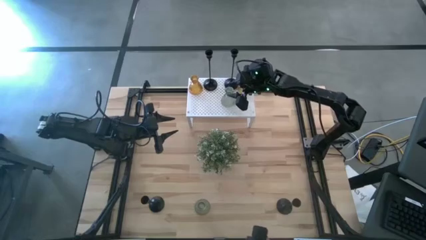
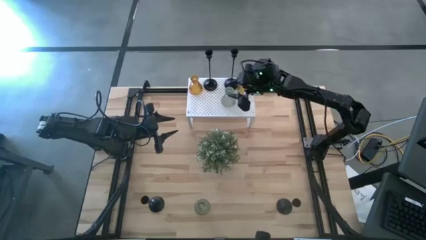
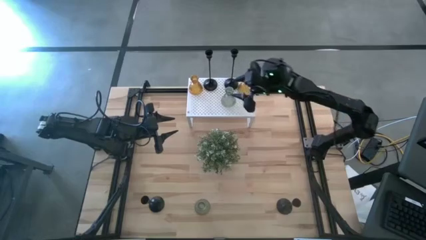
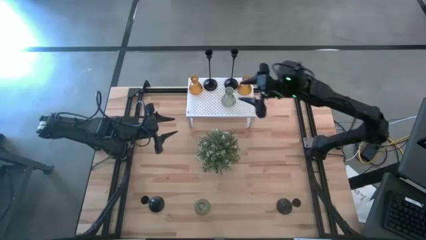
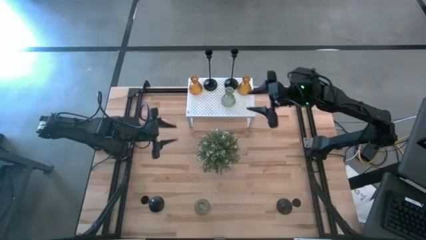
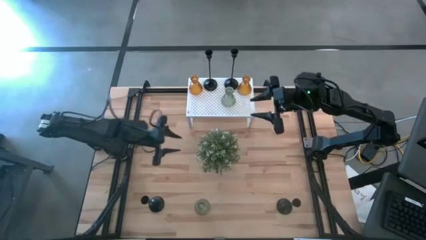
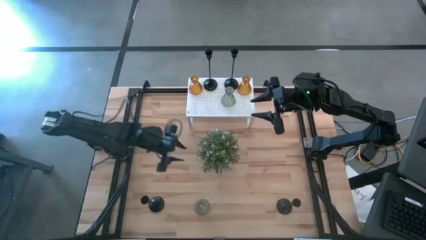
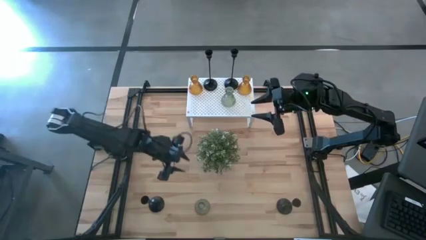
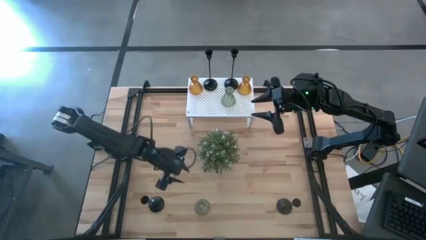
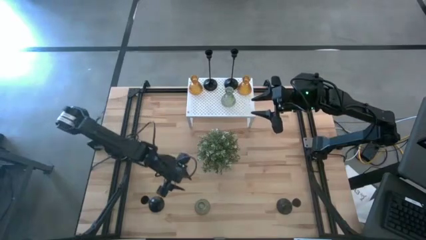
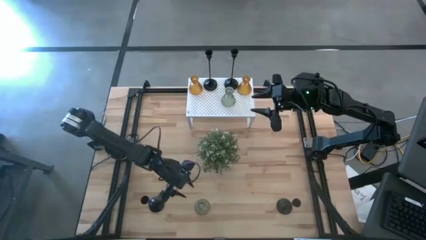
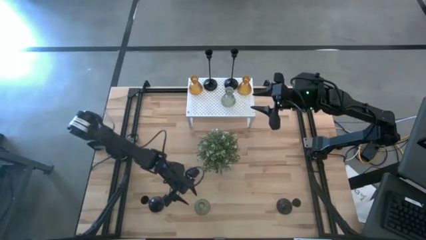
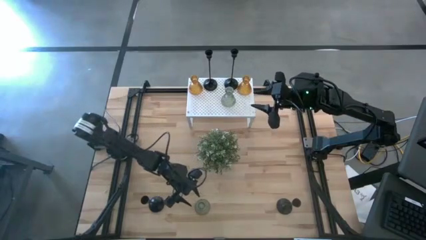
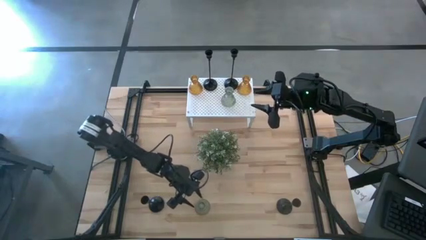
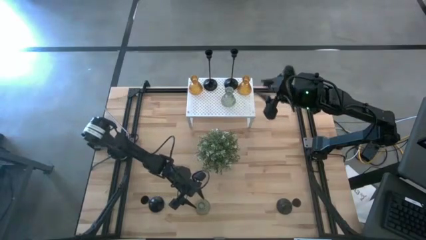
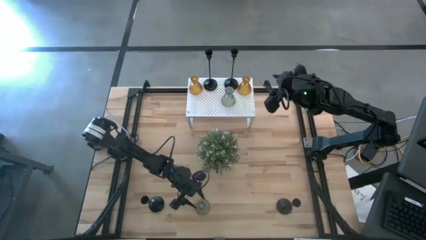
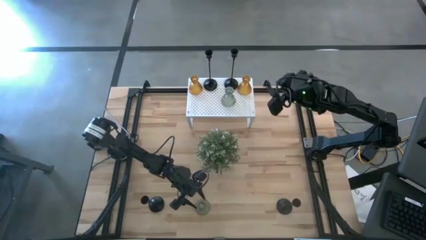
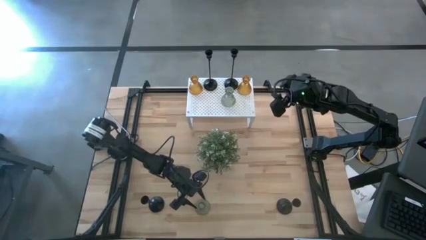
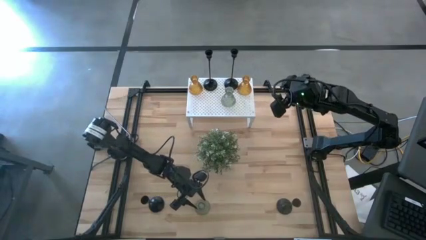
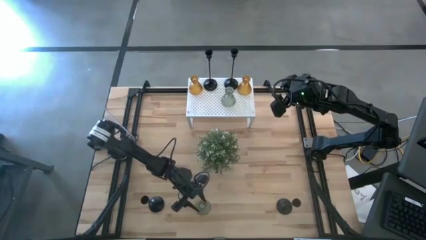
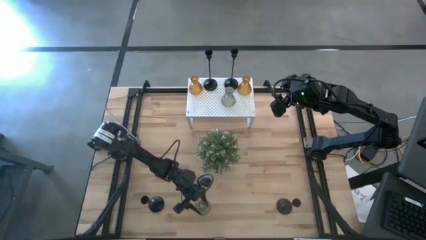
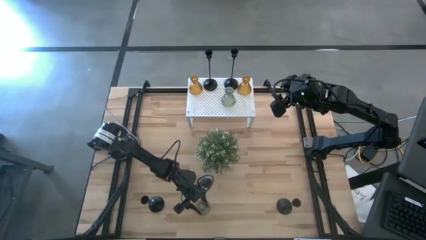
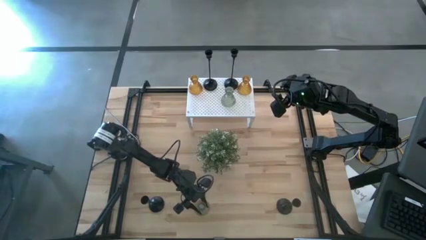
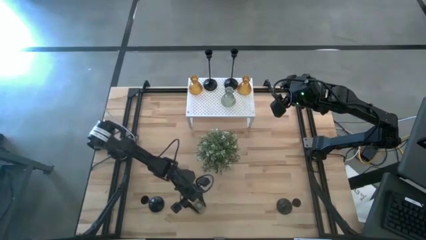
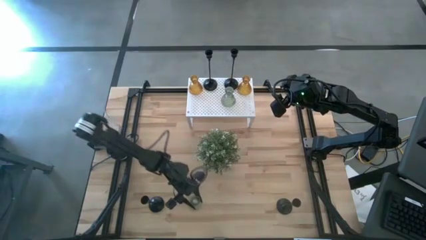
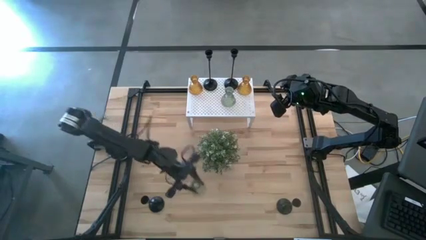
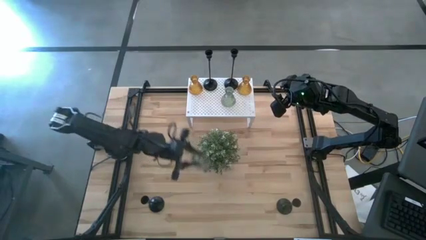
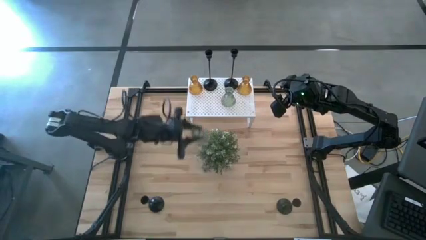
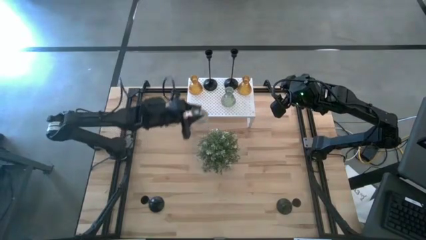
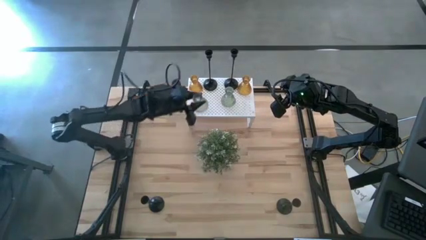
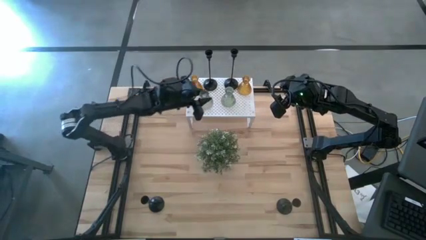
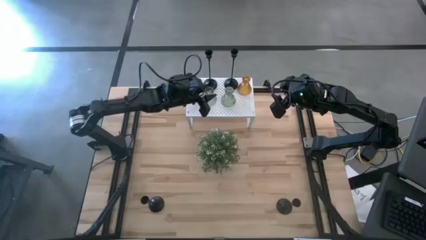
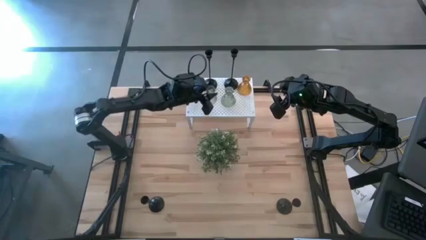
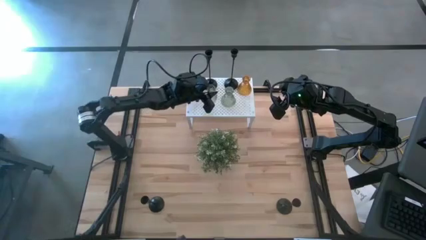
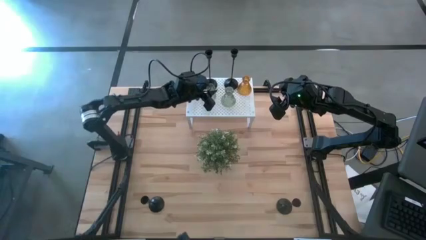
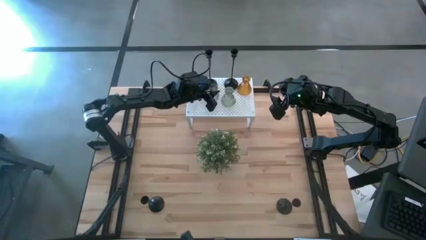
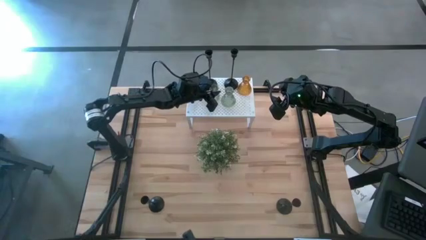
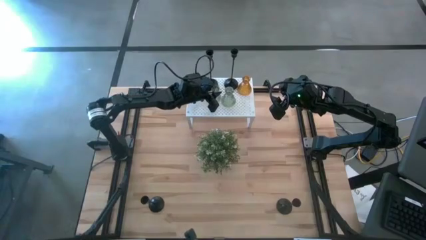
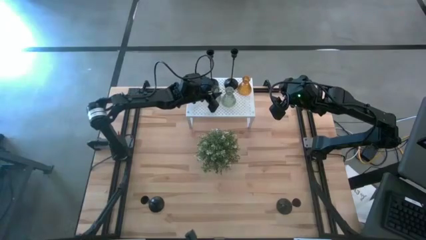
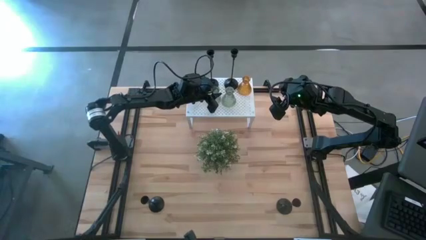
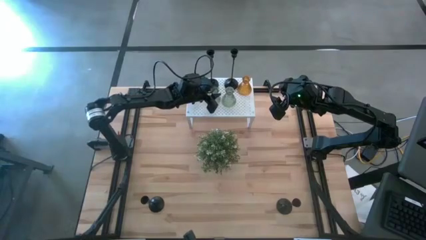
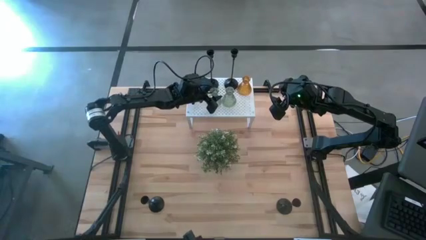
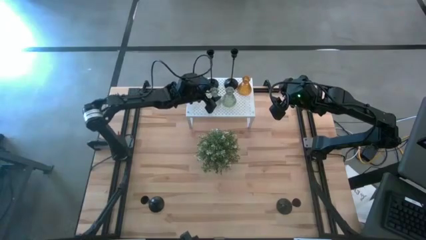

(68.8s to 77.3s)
Task: Pick & Place candle stick holders
Put the green glass candle holder on the shelf

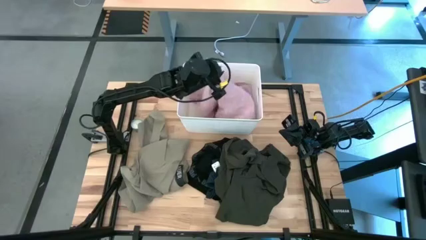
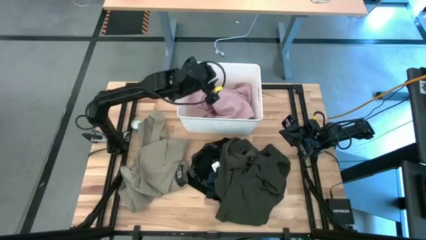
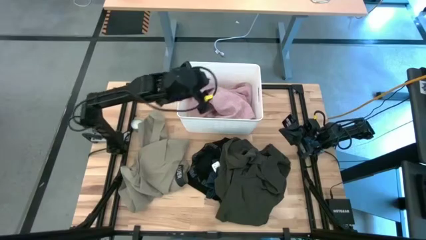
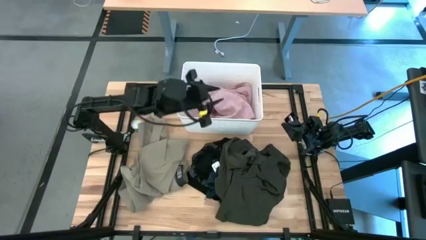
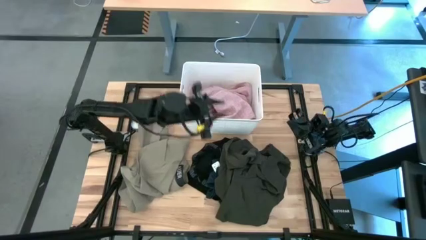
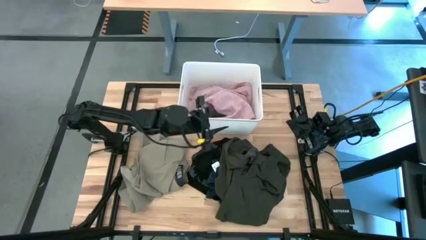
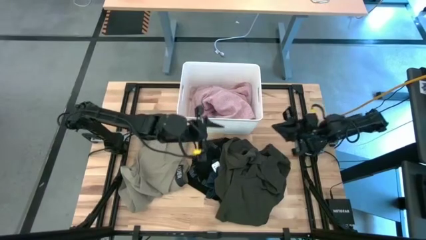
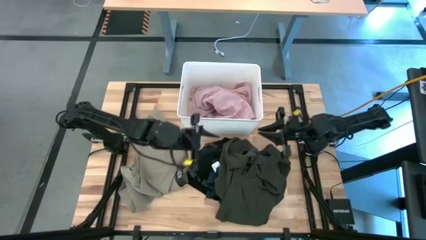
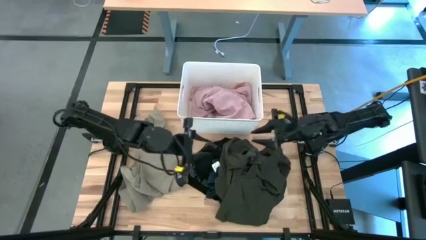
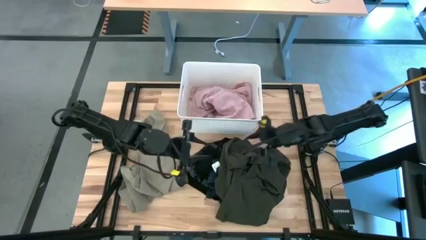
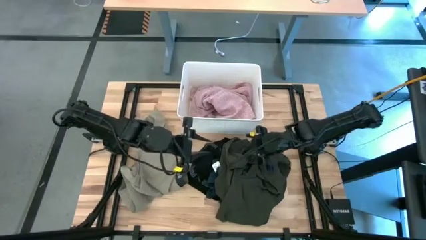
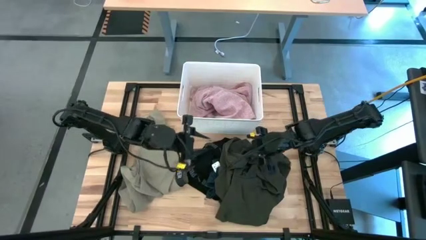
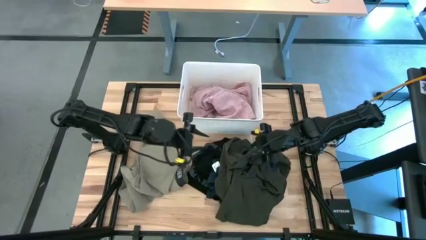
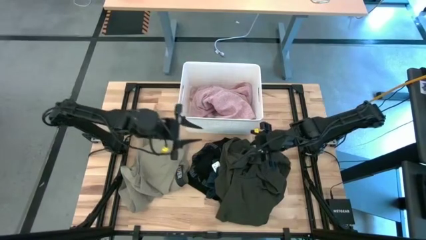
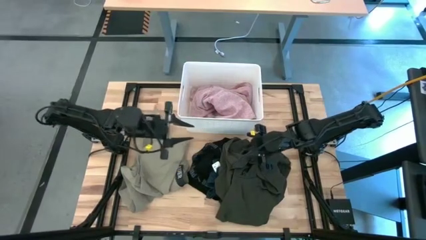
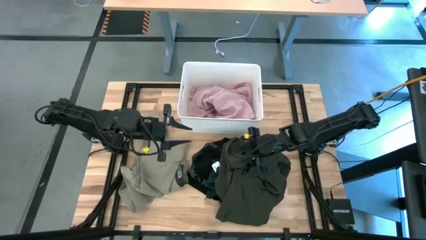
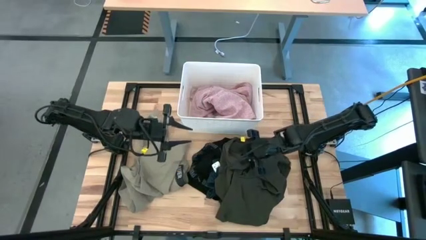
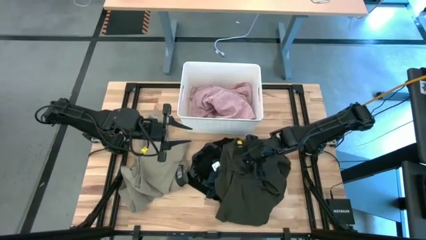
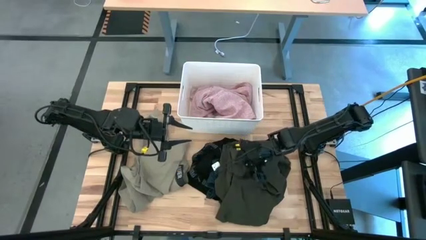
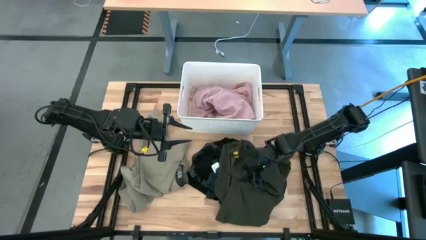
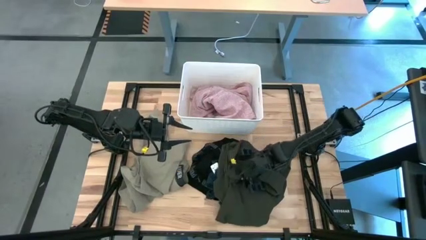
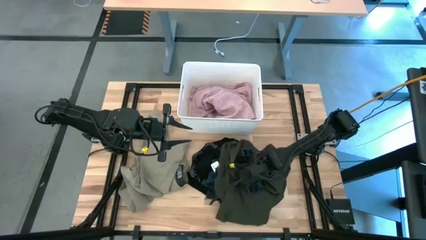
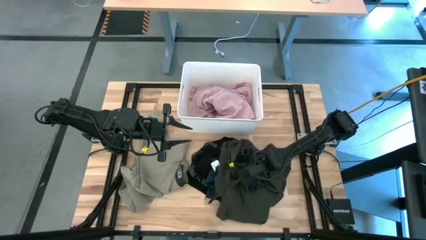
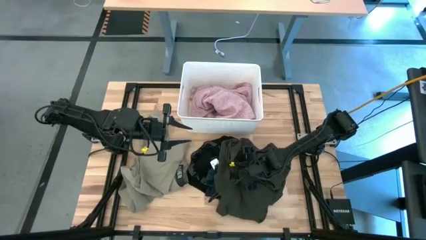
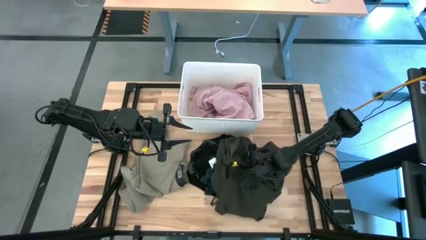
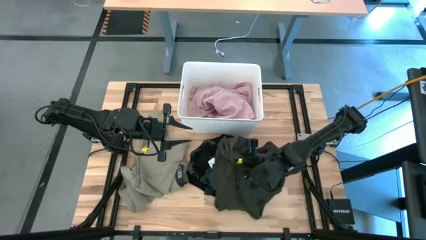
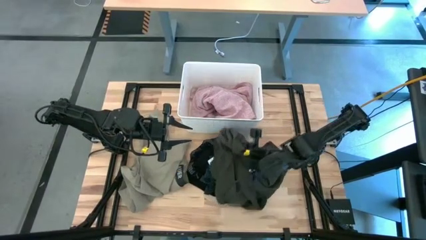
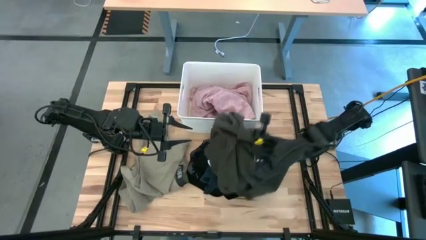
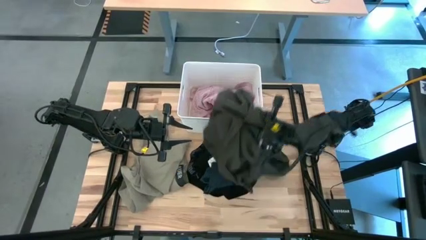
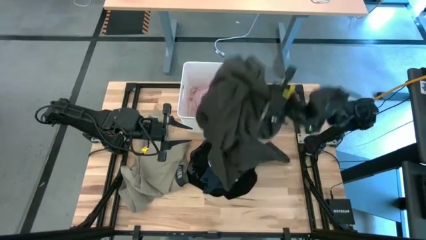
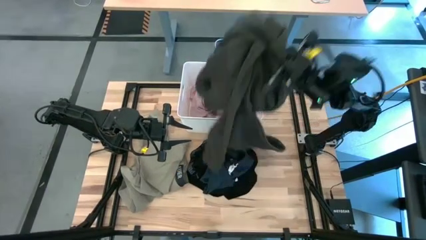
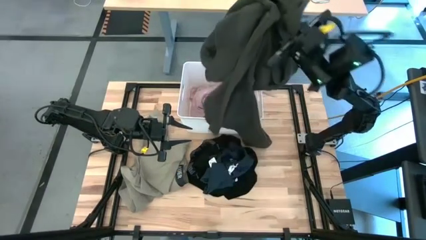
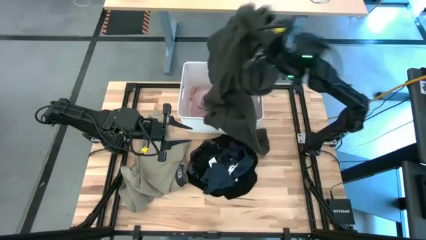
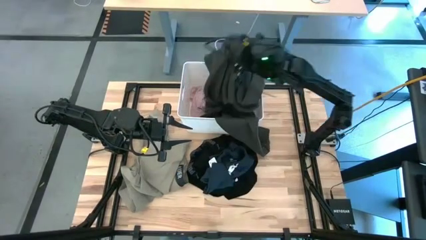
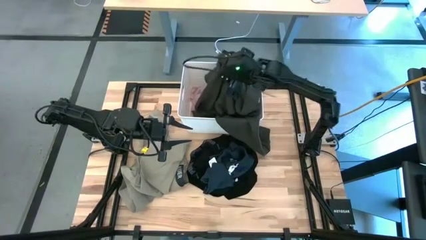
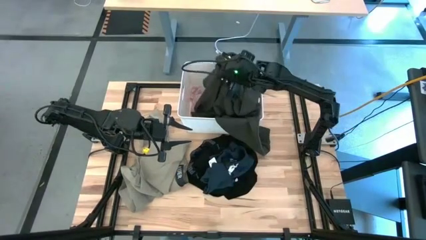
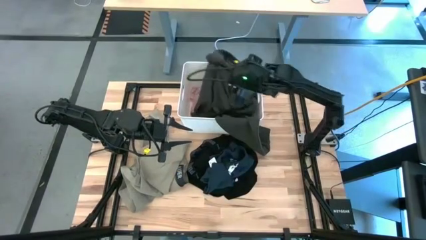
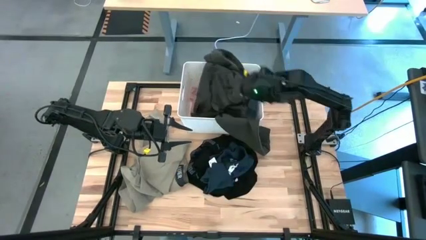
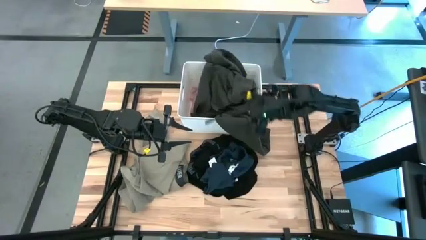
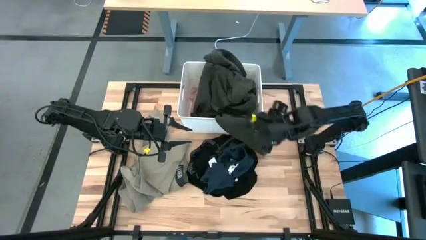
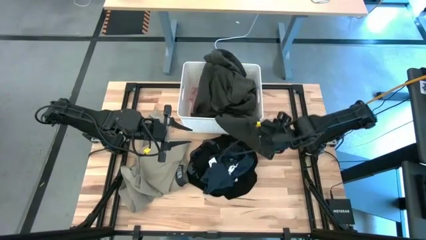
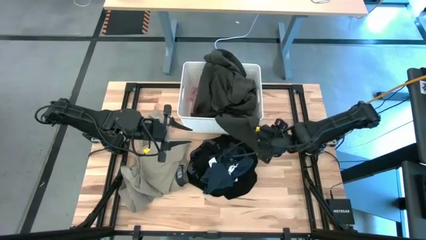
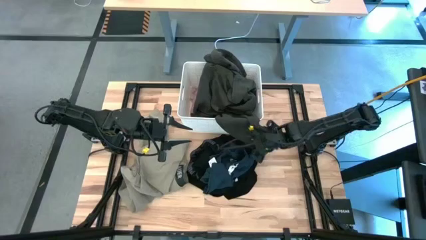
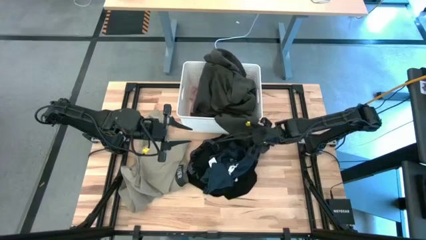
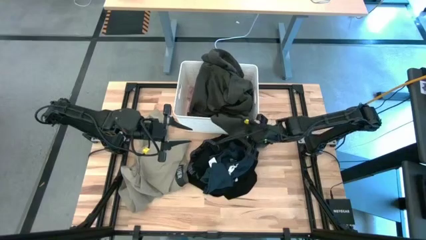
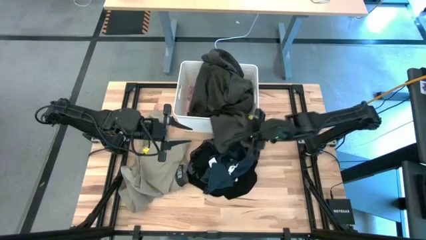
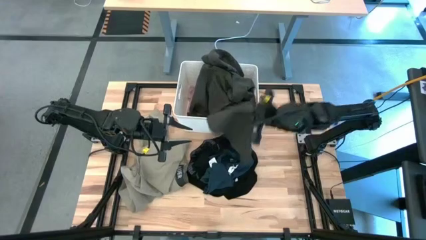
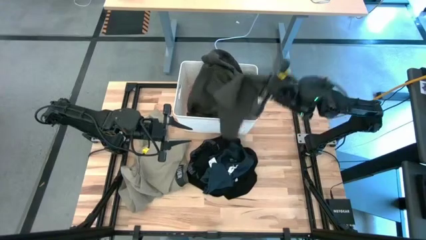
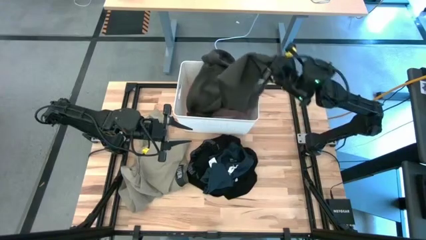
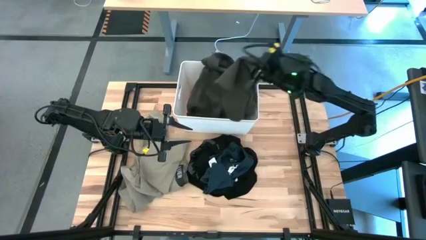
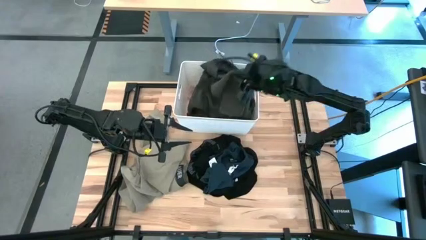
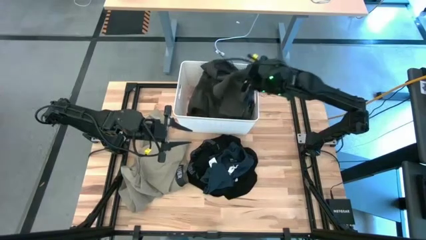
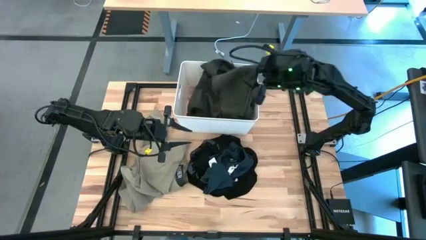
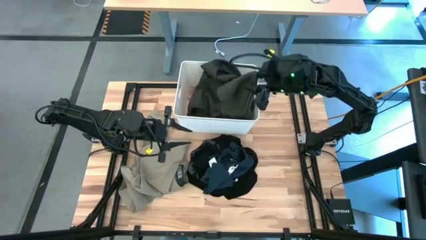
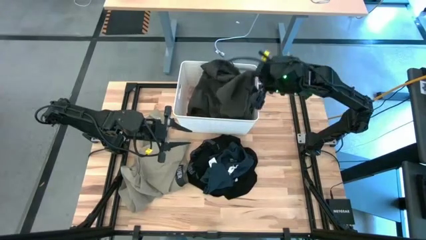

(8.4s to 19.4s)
Task: Sort clothes
Put the black hoodie into the white laundry bin
